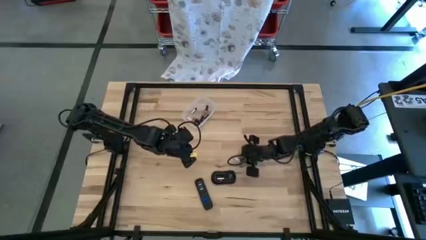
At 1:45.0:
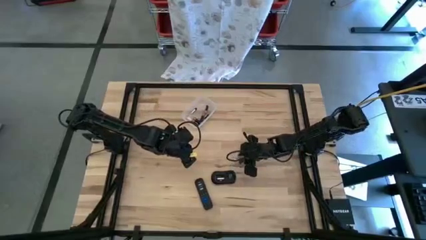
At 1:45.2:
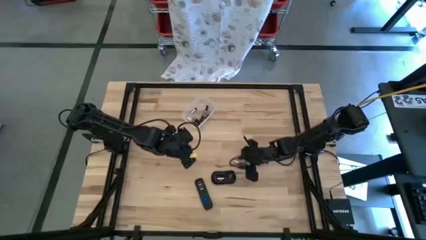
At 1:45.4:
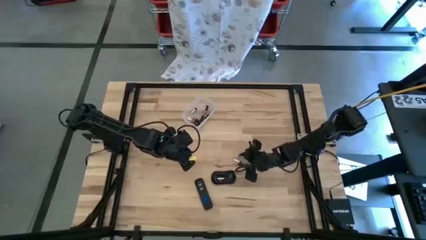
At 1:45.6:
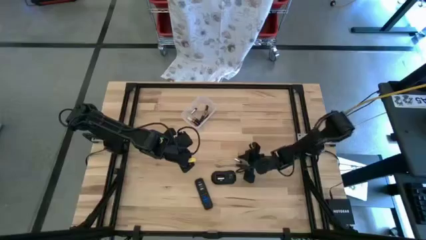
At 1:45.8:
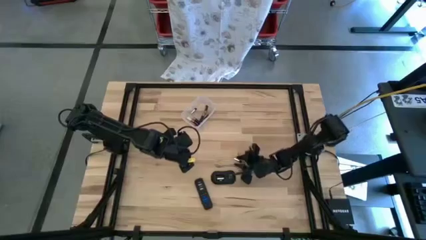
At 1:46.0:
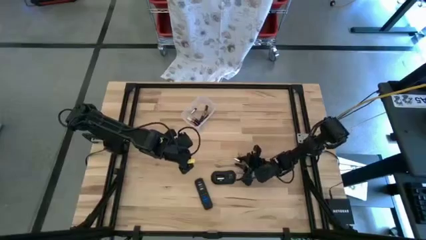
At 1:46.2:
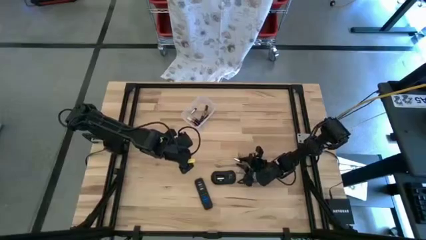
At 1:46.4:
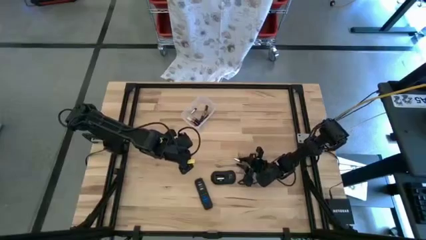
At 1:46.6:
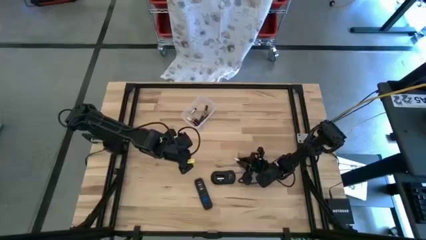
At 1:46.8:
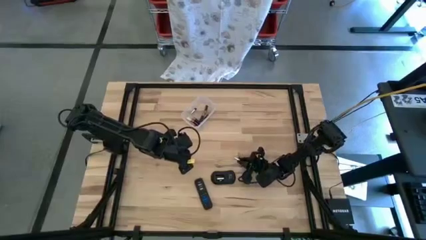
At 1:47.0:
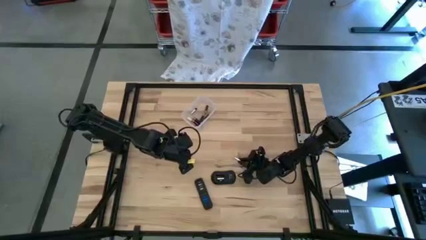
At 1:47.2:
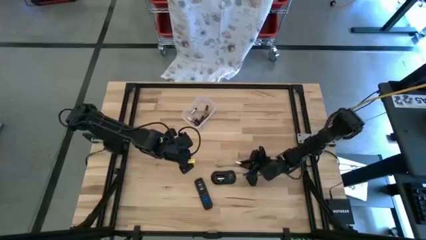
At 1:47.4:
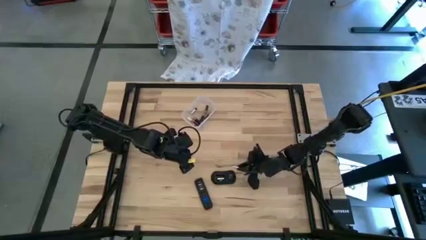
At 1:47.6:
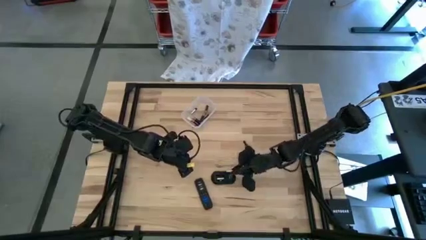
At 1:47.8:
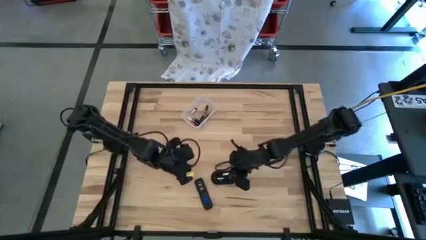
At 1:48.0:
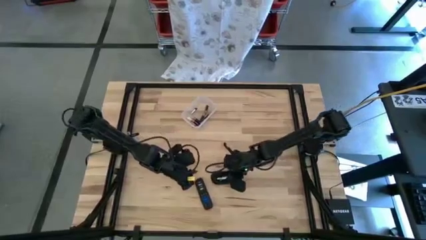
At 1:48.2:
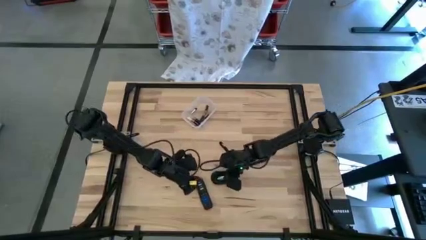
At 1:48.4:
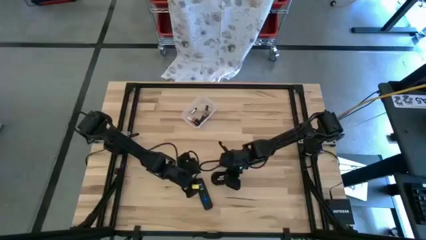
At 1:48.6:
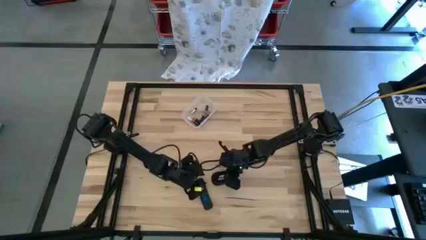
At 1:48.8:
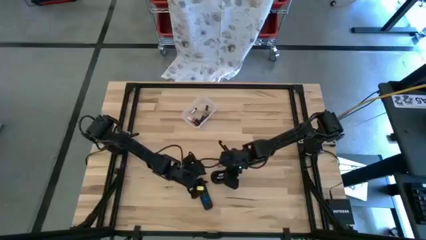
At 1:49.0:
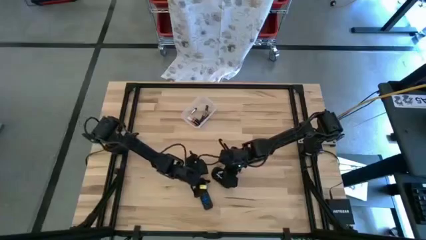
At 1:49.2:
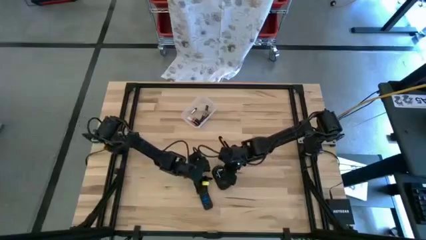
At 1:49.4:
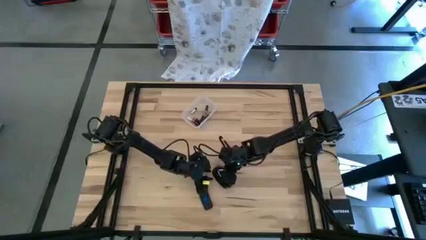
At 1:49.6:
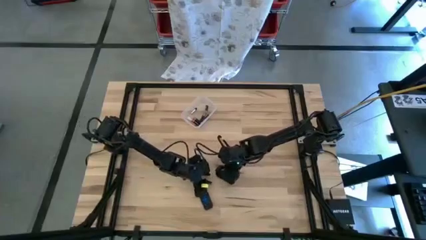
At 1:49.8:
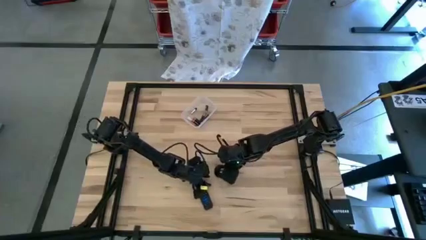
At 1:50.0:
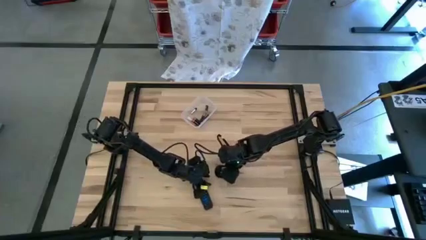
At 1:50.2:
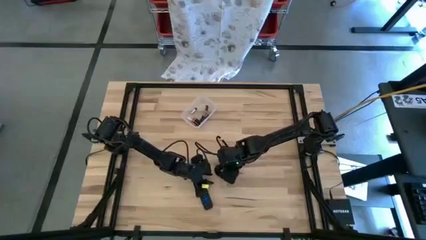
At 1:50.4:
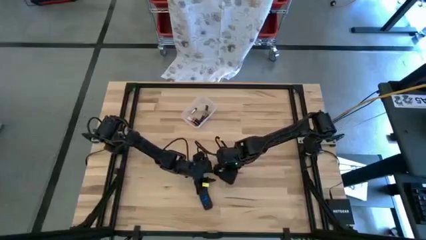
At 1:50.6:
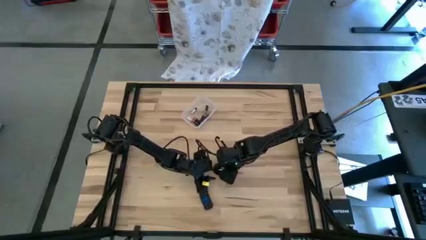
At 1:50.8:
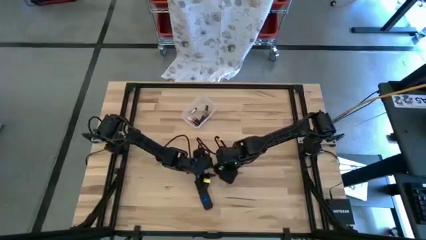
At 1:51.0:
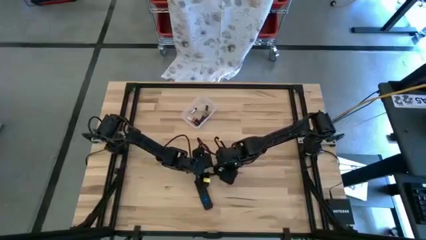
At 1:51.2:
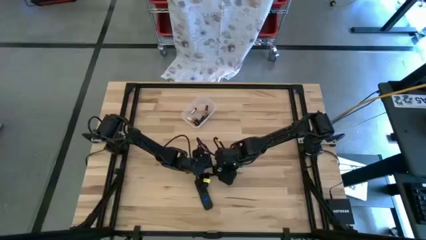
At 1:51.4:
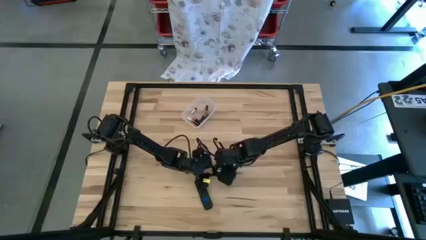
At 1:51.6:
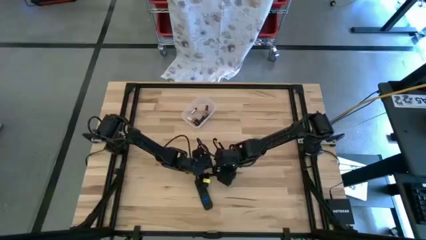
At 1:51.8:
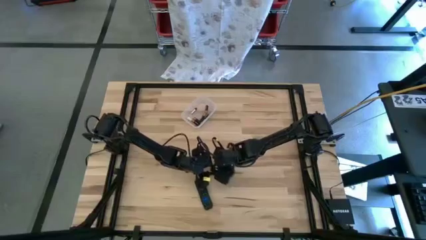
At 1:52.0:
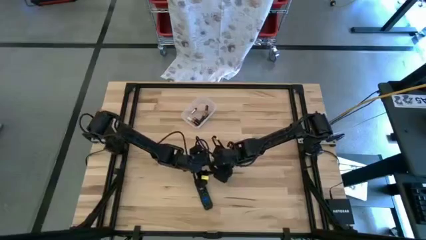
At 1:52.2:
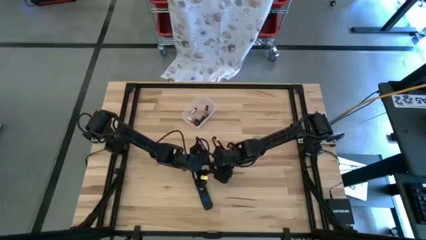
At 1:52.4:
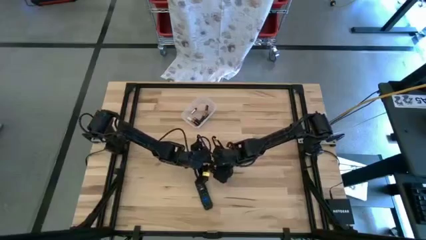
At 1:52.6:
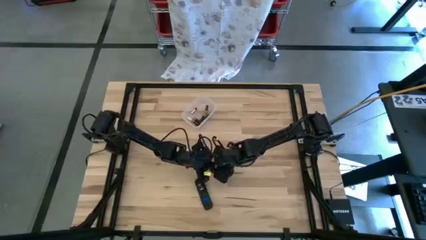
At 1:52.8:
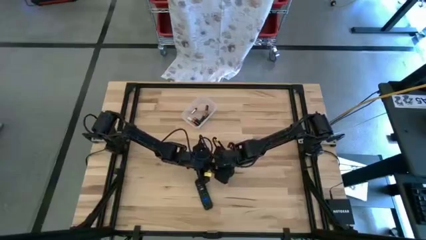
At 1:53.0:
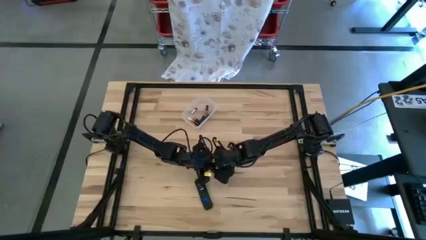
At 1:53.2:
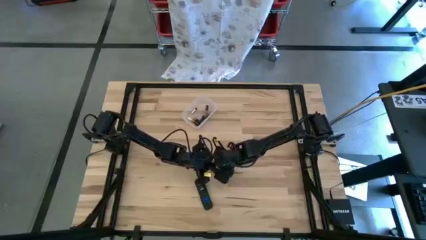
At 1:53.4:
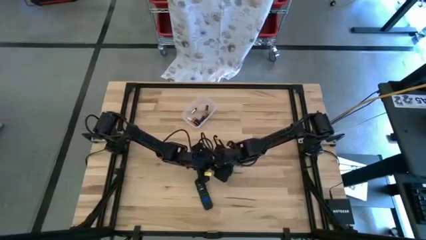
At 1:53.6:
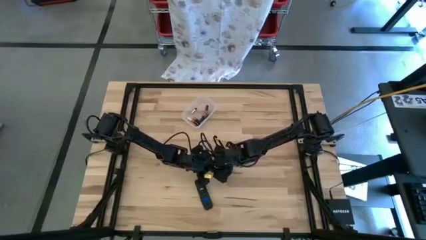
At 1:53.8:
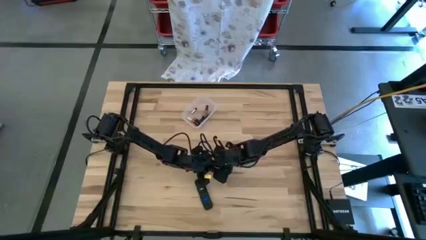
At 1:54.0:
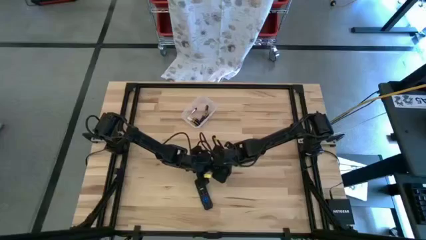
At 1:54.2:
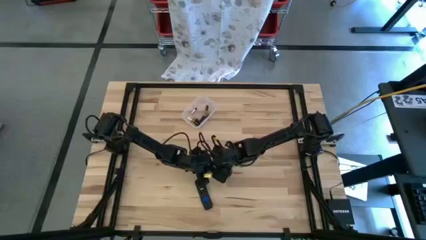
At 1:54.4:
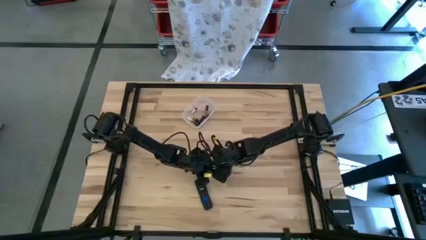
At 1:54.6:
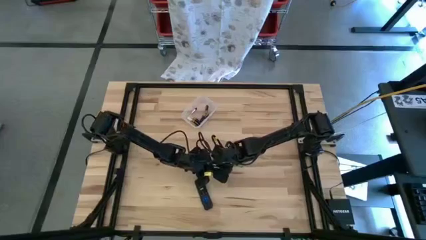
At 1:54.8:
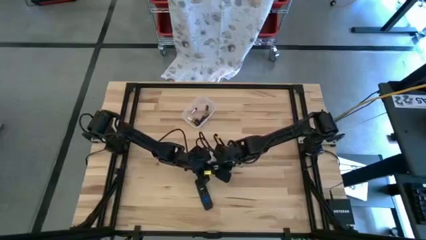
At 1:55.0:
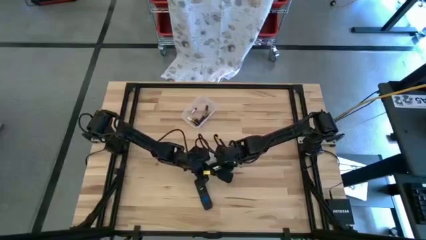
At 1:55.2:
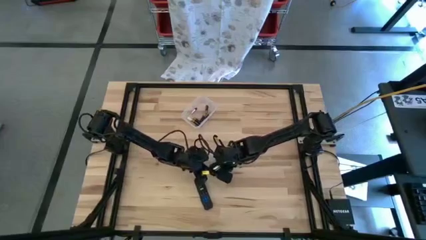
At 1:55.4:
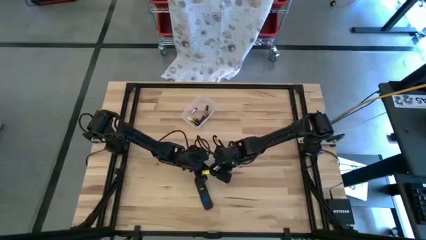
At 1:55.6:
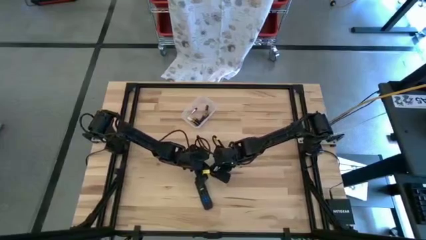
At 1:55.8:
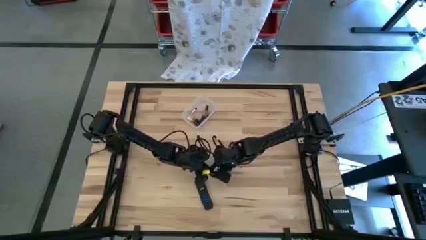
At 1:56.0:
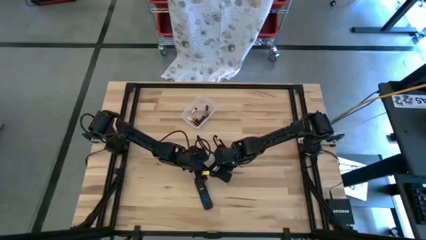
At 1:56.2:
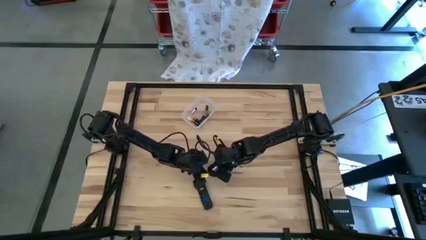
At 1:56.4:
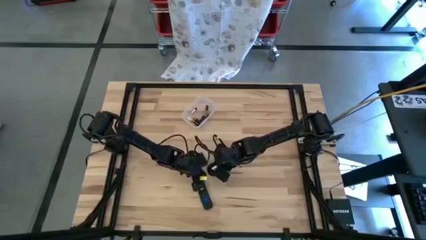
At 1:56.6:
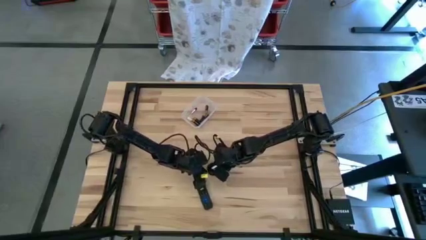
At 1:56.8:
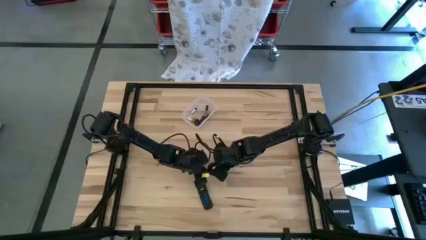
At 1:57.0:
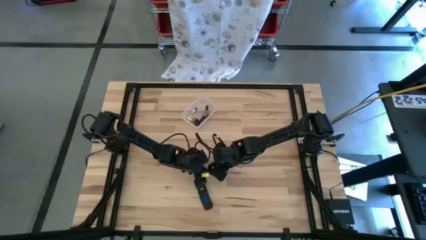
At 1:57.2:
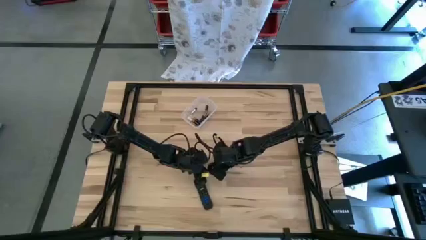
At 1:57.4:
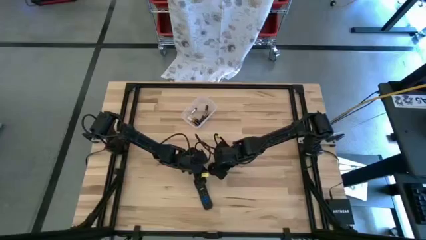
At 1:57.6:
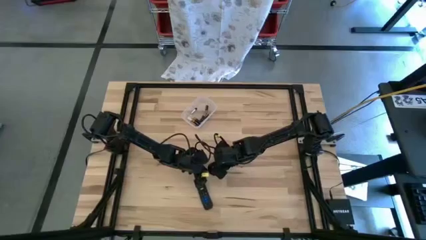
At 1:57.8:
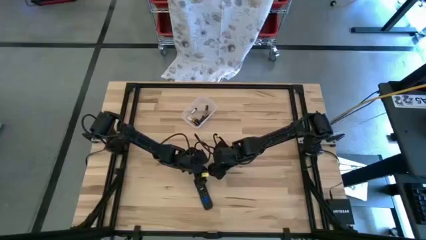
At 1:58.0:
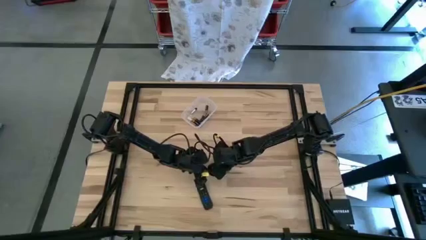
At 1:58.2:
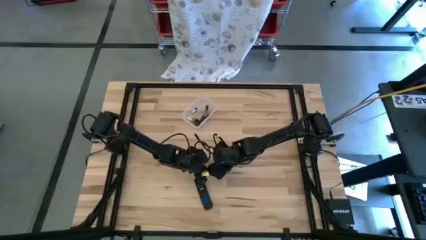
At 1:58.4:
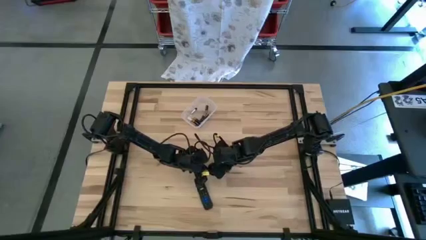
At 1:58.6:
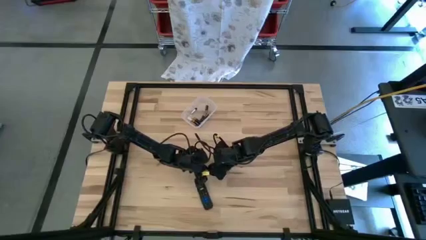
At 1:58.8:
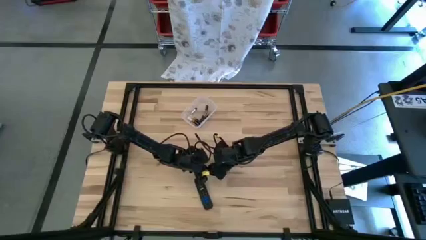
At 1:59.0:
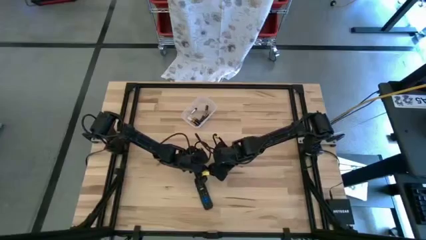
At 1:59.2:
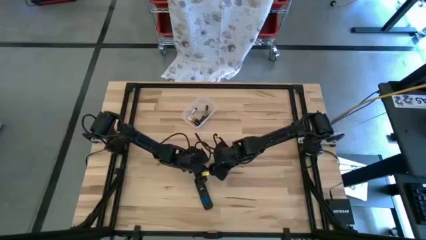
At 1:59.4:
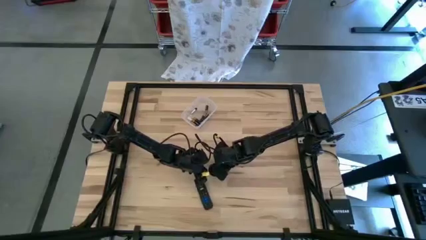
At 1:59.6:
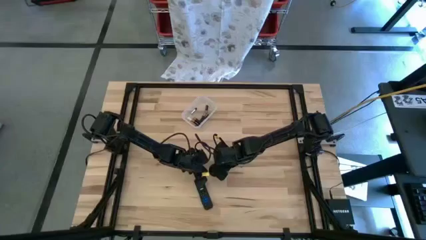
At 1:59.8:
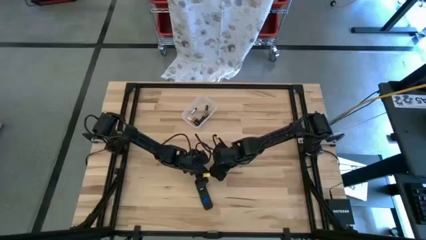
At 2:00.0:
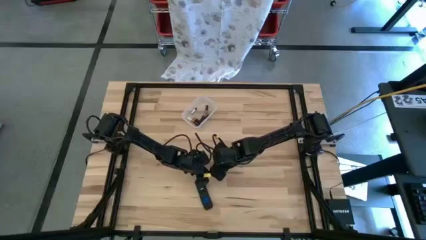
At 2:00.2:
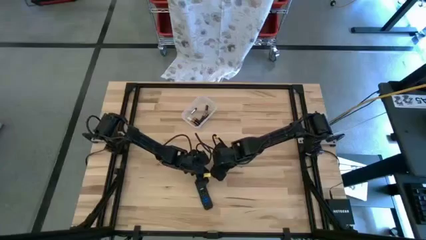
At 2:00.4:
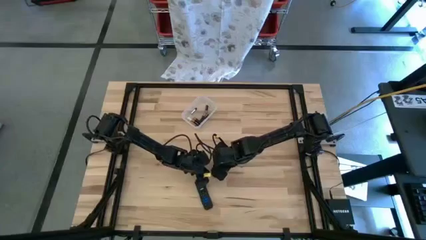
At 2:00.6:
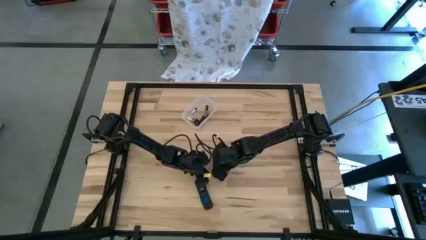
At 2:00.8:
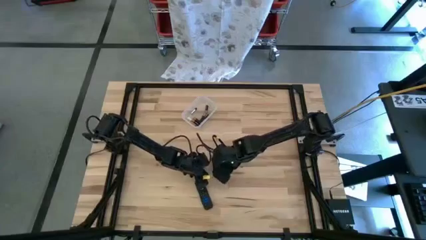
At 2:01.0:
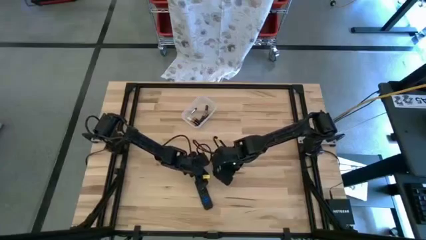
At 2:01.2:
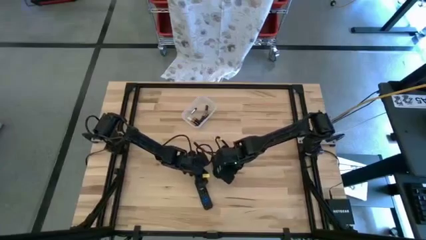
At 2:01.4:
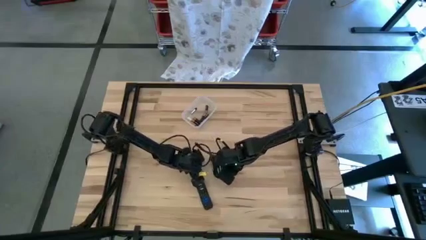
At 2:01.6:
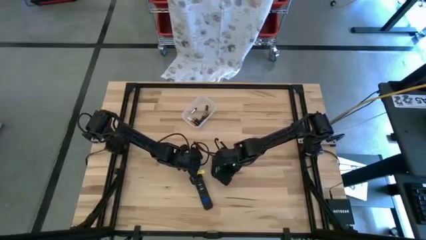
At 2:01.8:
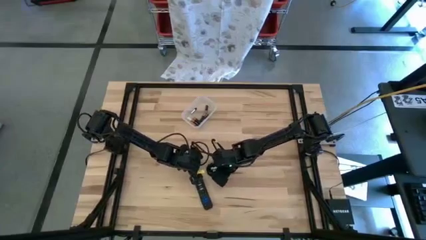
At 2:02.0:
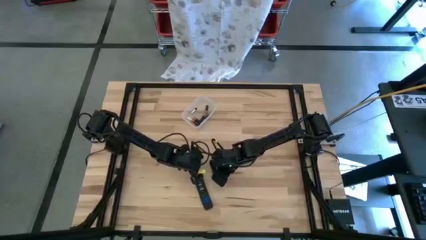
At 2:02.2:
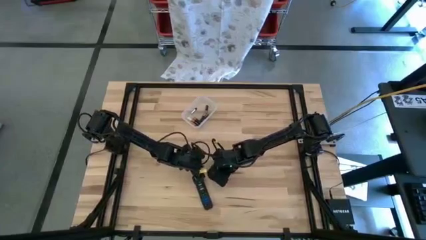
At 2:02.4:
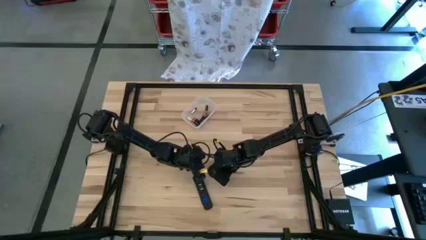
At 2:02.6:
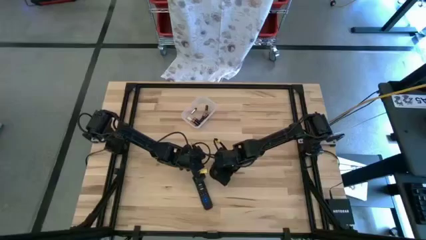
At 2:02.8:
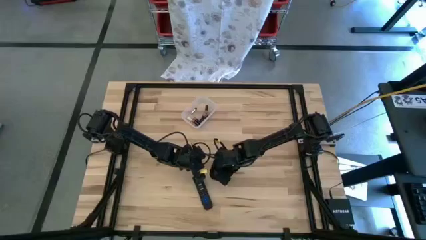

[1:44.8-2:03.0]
Task: Insert battery
Insert the silver battery into the mouse
